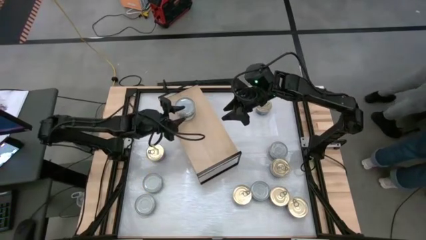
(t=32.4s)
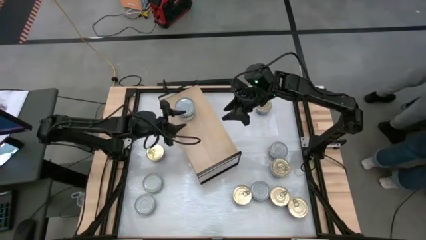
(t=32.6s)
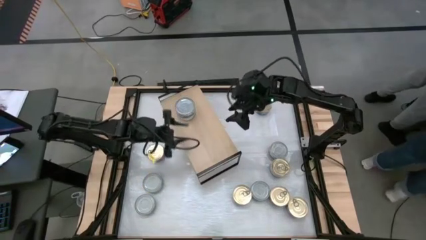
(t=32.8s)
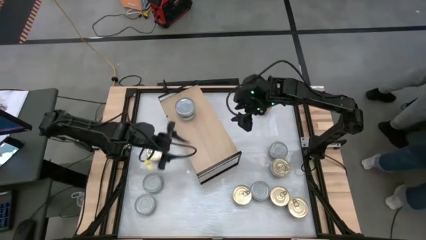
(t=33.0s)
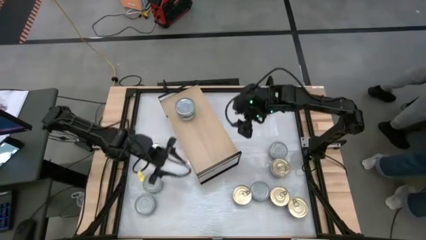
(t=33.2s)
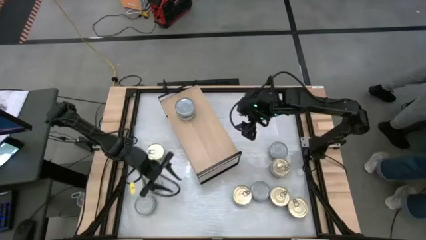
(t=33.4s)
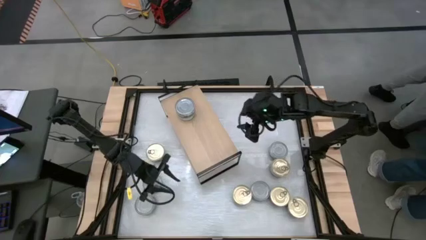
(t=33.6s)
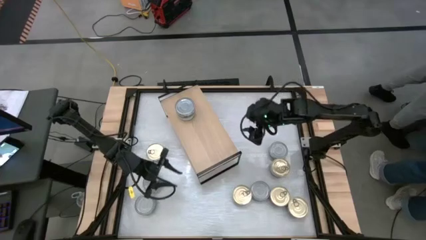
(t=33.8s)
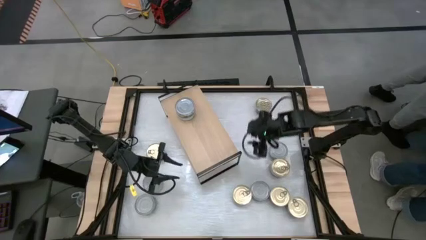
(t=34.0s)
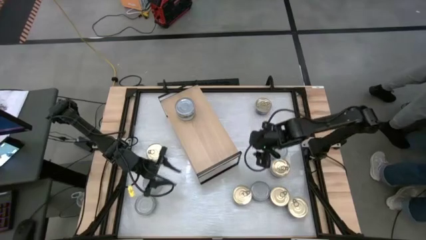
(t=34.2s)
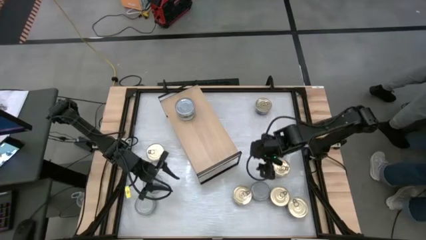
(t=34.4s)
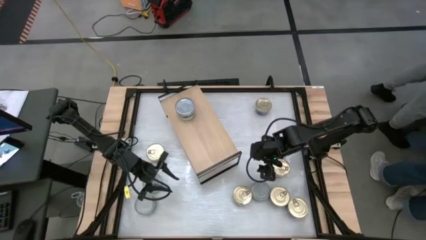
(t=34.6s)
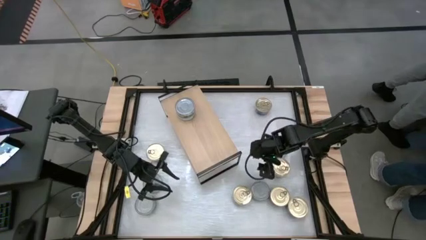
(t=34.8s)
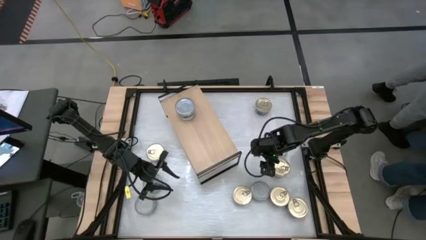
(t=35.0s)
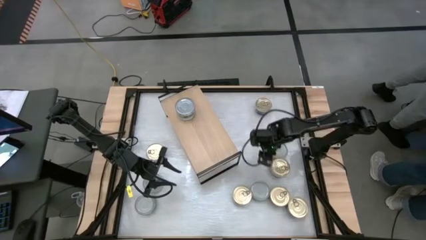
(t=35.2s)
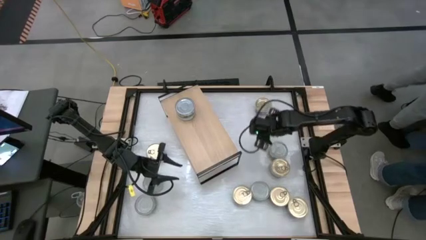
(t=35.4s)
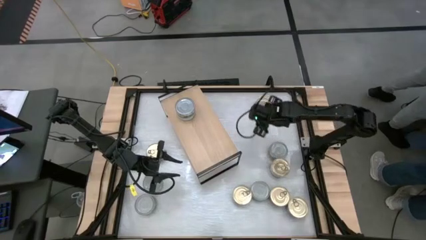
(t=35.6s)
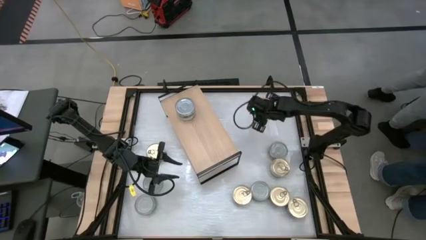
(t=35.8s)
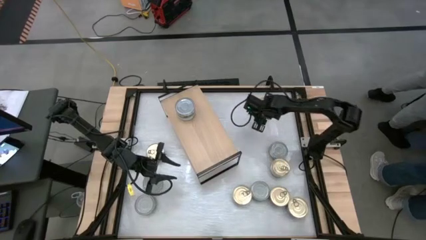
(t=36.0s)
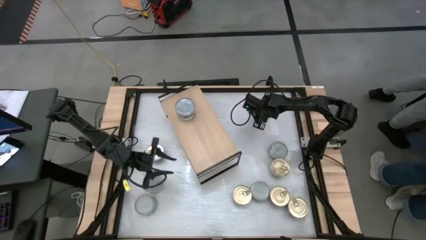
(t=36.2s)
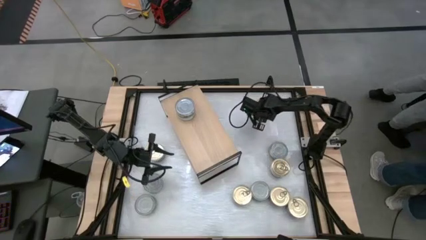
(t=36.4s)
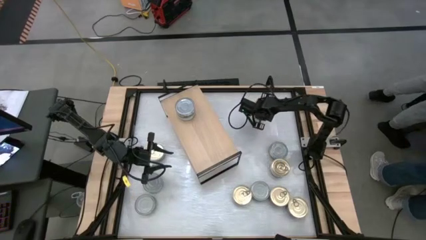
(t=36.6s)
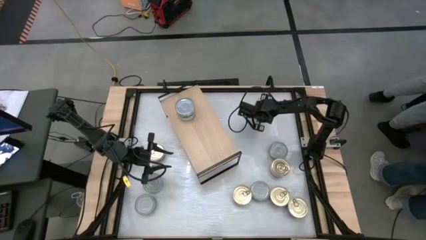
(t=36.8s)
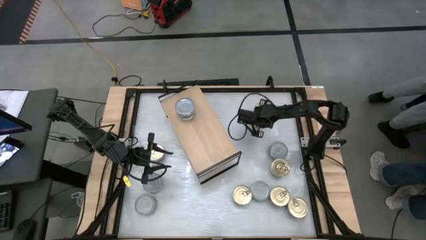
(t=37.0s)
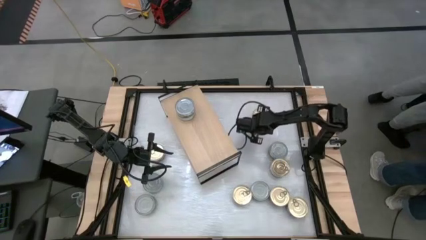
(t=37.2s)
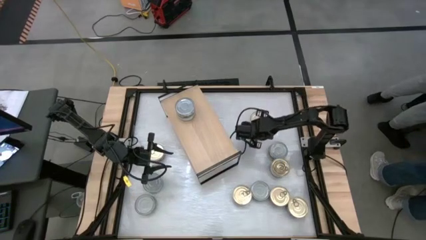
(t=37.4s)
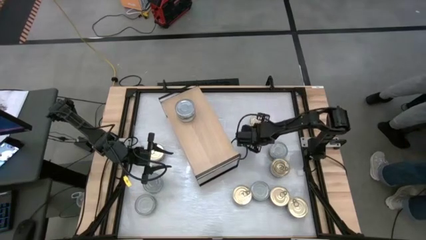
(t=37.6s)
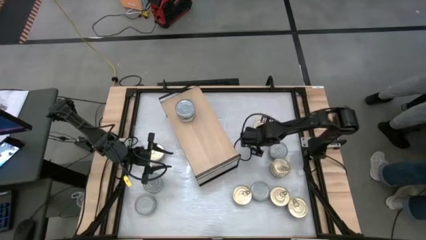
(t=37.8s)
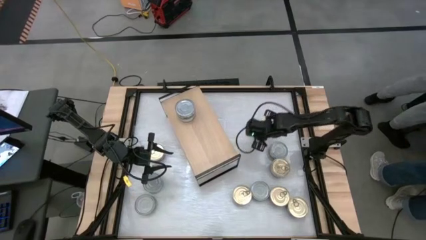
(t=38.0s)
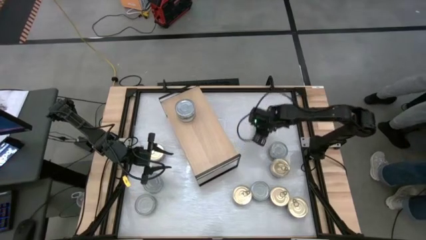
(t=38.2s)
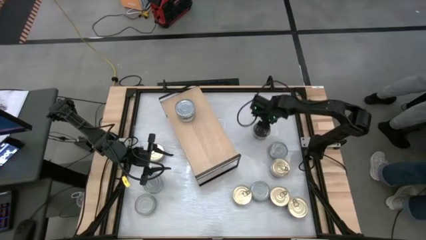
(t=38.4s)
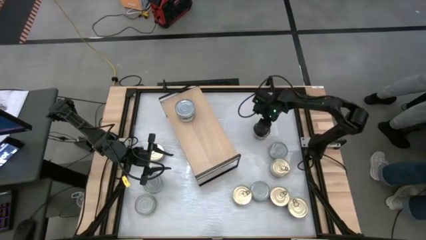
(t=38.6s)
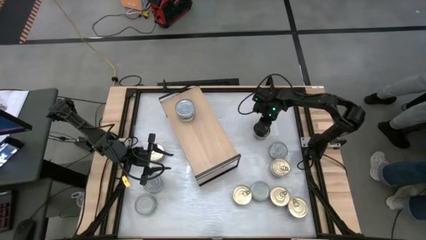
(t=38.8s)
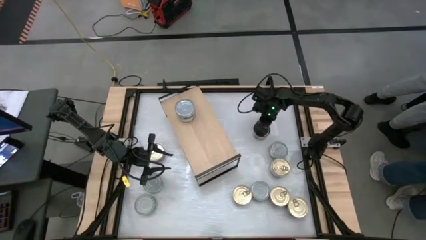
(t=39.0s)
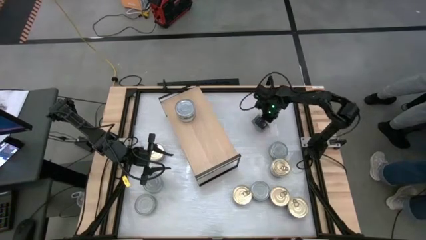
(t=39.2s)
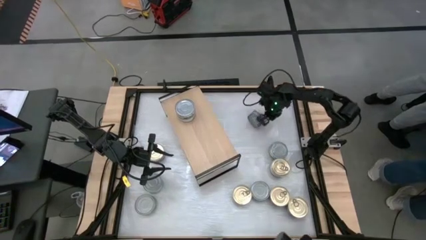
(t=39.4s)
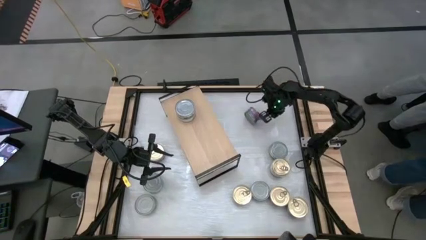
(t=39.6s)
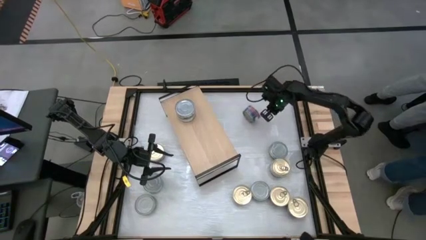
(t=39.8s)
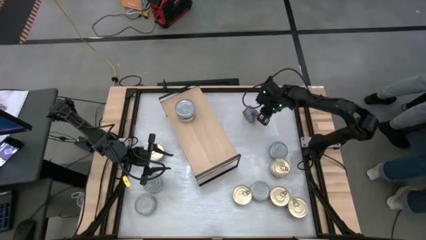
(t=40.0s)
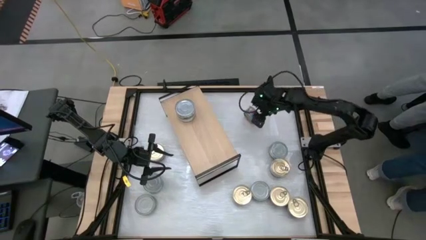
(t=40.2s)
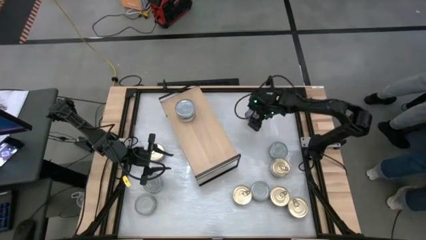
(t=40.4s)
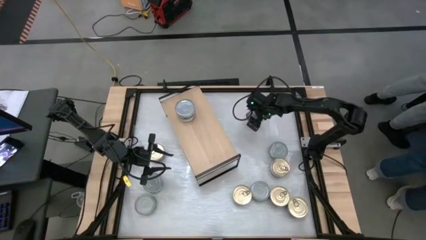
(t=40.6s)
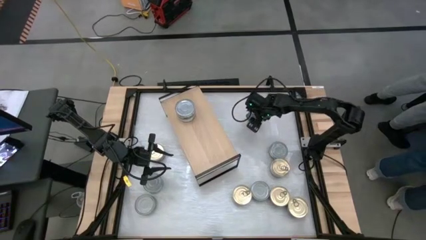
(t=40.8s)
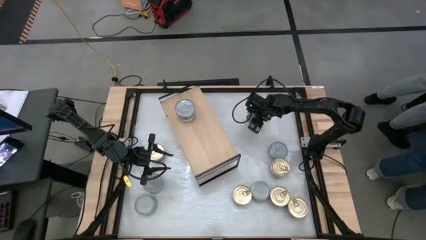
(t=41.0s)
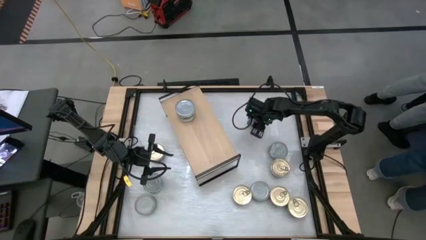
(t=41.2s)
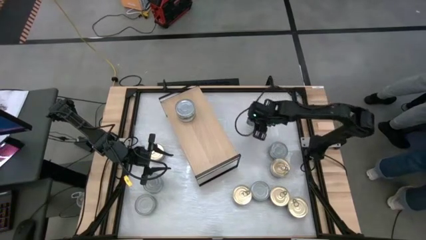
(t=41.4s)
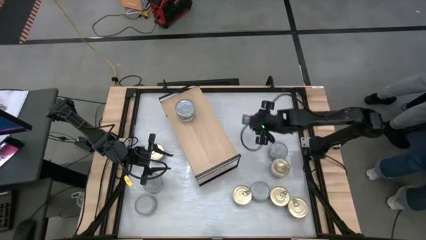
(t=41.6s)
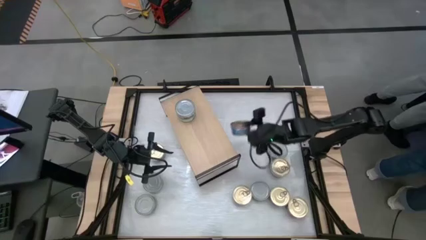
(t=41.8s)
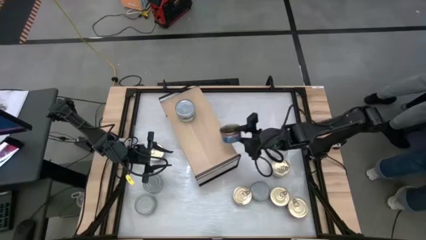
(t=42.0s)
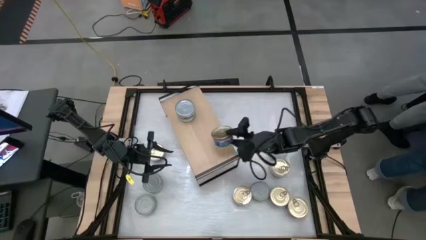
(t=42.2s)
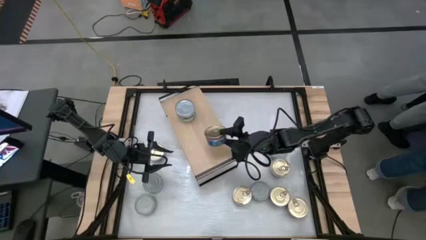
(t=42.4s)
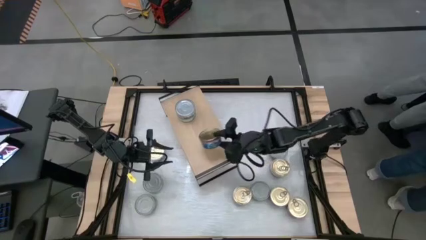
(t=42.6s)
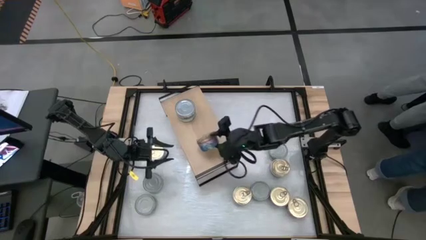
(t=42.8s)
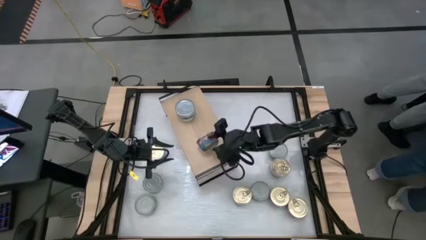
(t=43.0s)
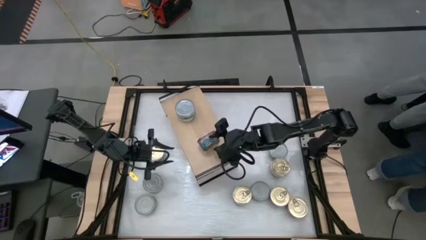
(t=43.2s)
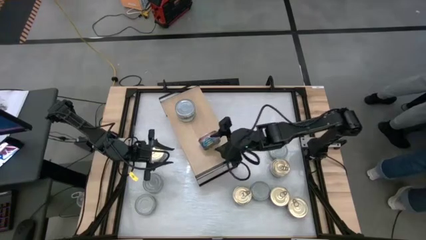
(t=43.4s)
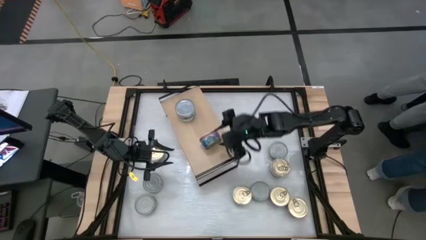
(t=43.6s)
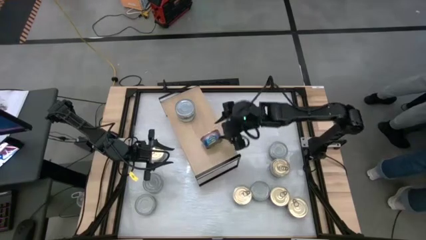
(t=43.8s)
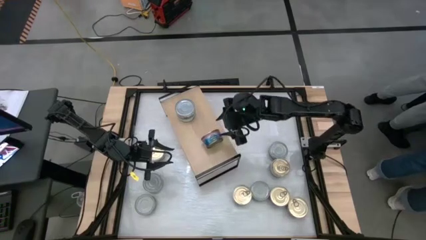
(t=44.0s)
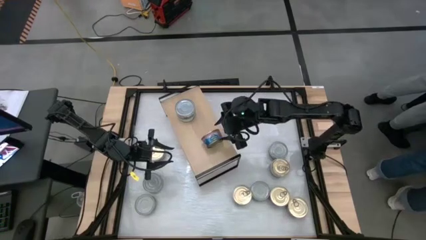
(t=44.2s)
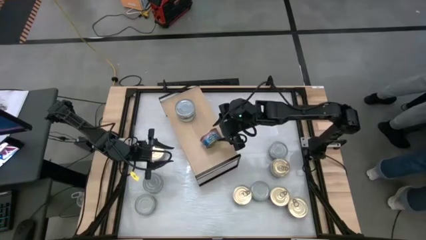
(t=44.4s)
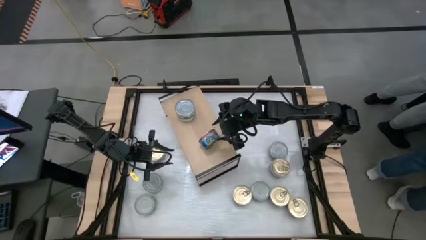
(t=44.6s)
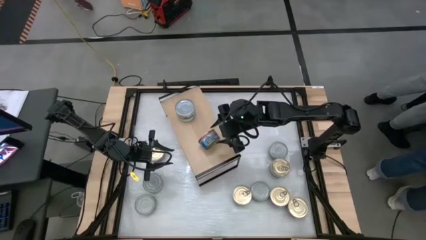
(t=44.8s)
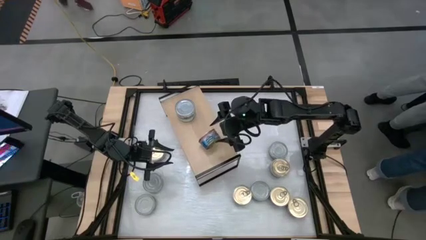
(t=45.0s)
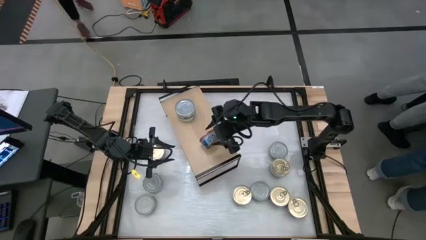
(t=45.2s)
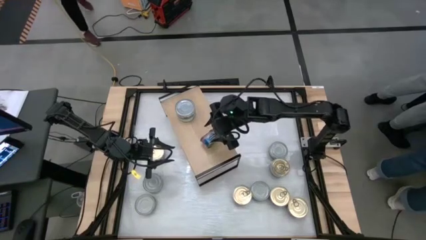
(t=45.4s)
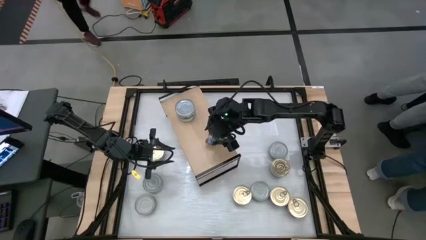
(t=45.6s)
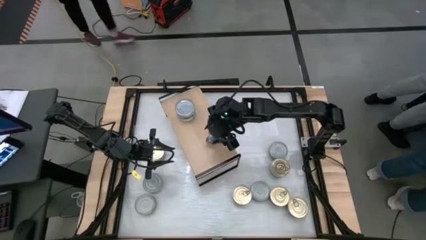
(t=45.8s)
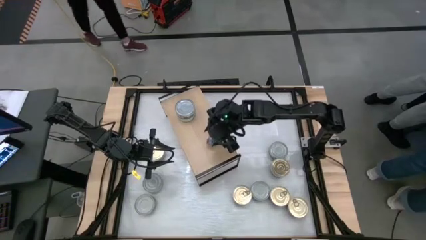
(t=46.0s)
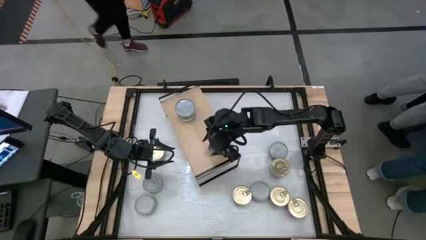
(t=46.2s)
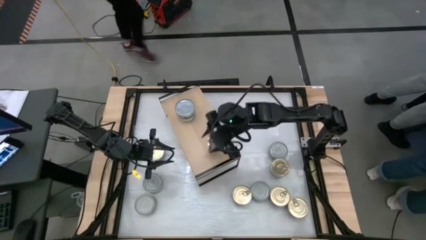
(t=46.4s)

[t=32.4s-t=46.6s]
Task: Stack canned seafood by type on shelf
Put the blue tuna can on the shelf
